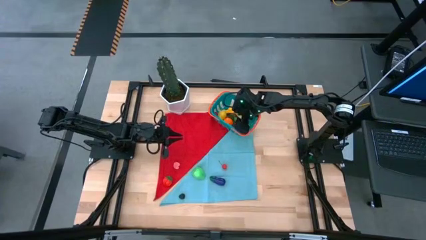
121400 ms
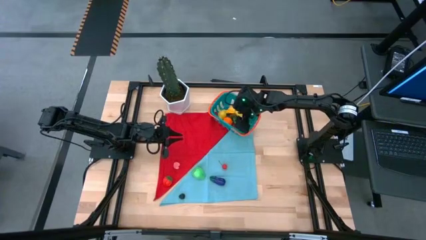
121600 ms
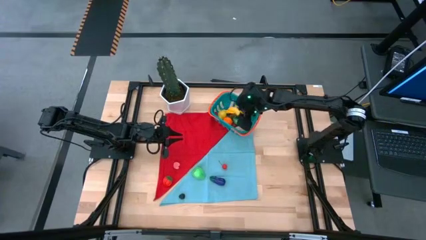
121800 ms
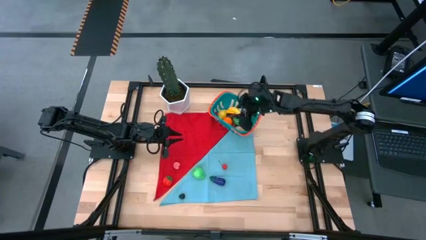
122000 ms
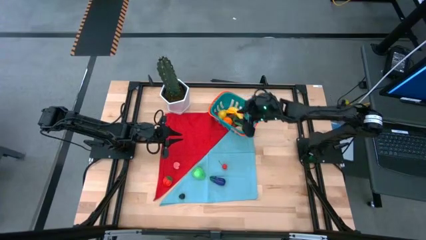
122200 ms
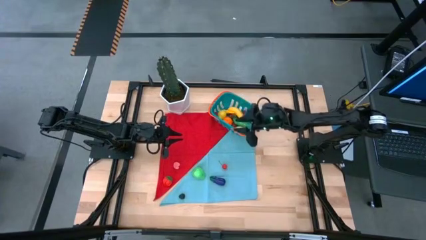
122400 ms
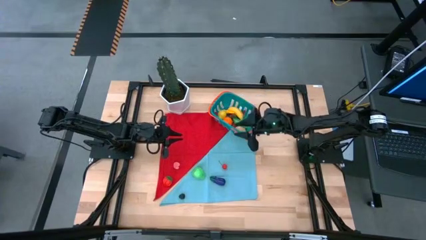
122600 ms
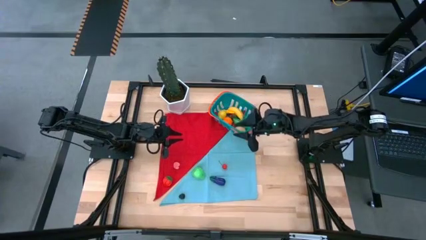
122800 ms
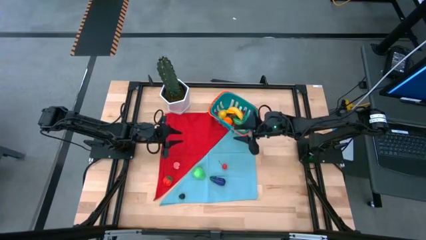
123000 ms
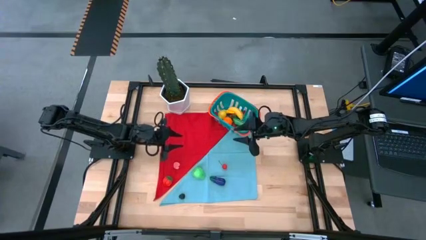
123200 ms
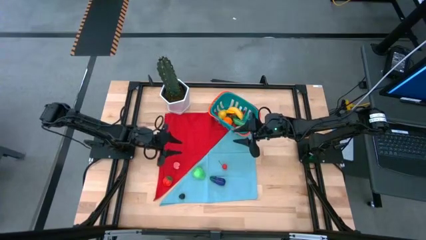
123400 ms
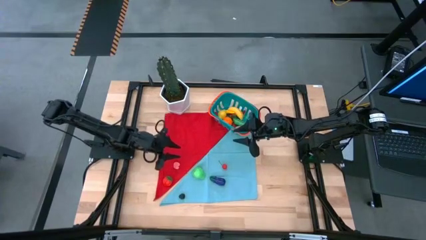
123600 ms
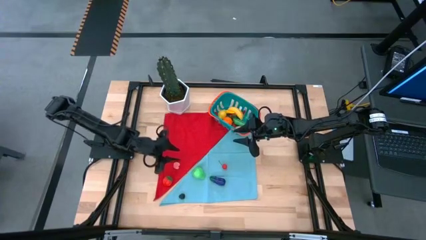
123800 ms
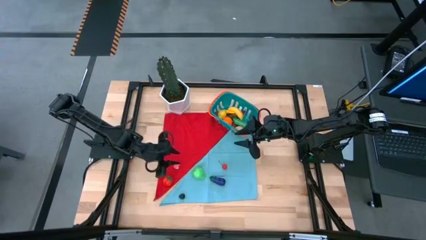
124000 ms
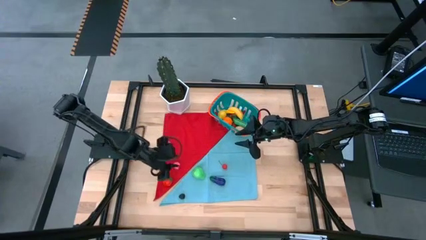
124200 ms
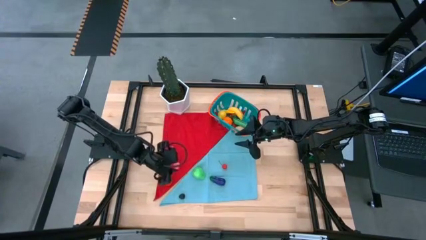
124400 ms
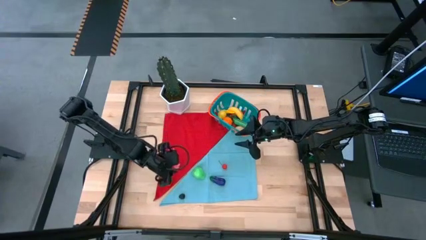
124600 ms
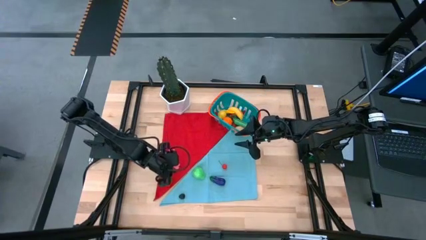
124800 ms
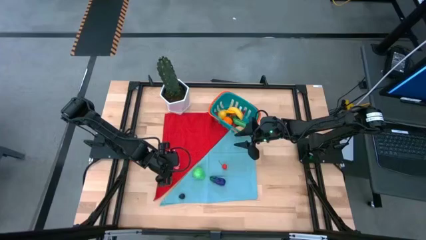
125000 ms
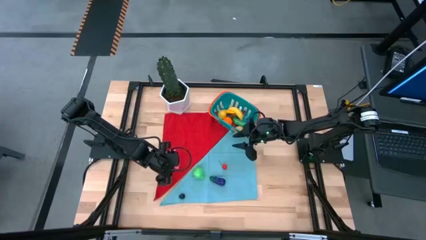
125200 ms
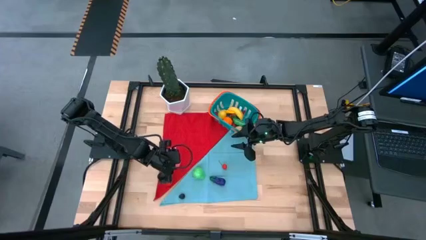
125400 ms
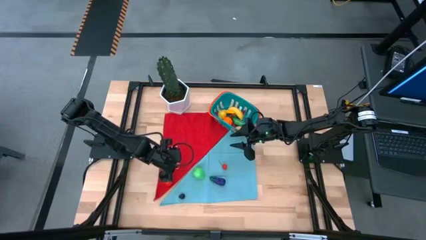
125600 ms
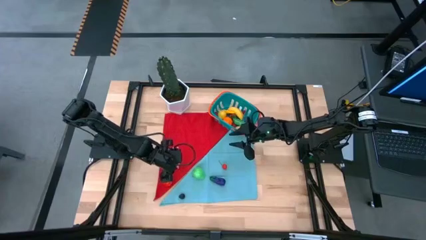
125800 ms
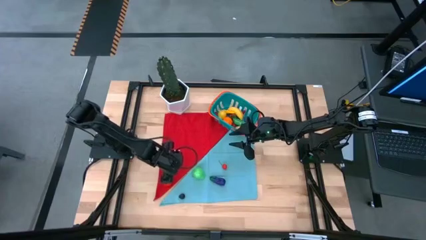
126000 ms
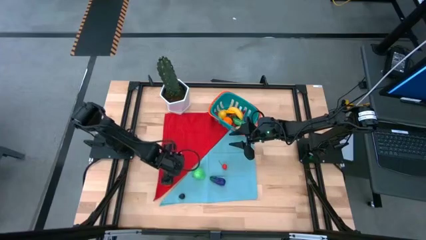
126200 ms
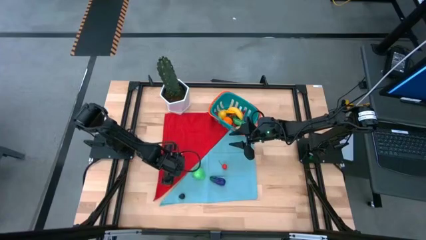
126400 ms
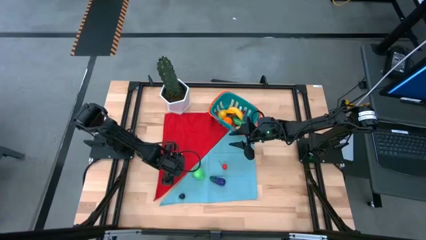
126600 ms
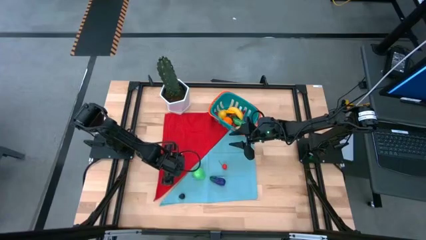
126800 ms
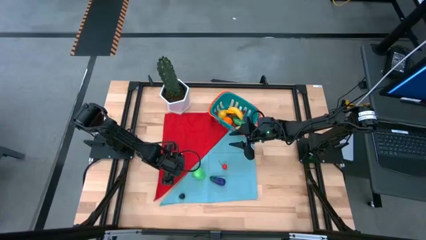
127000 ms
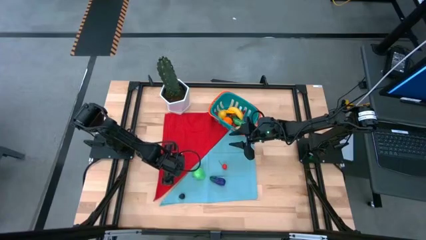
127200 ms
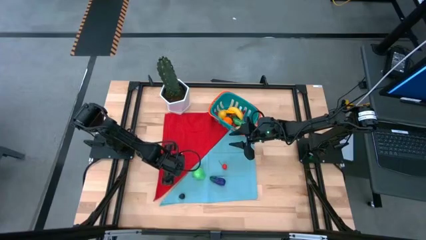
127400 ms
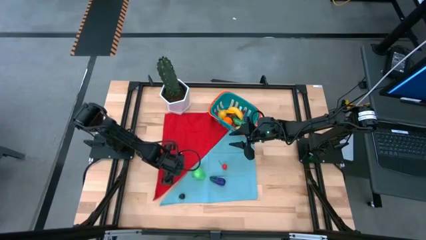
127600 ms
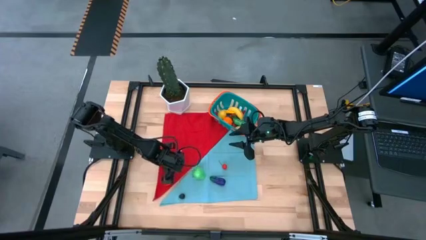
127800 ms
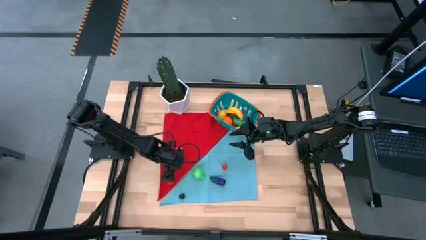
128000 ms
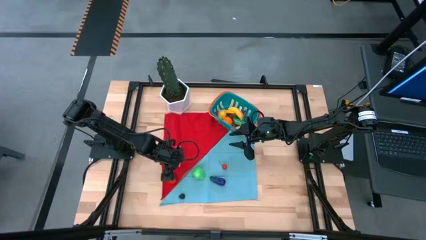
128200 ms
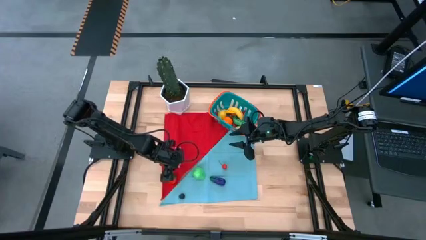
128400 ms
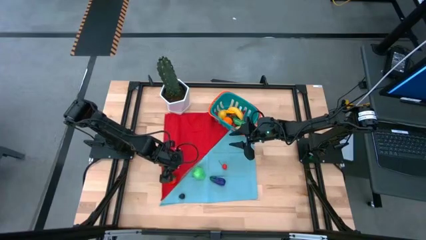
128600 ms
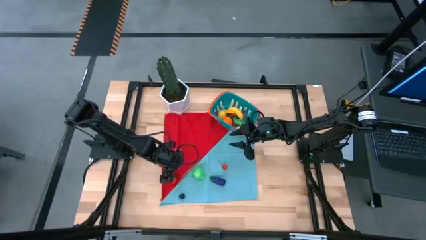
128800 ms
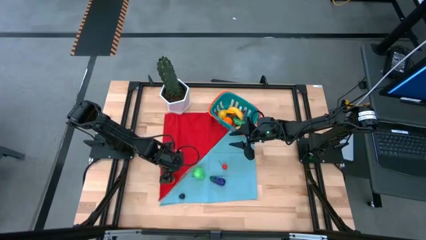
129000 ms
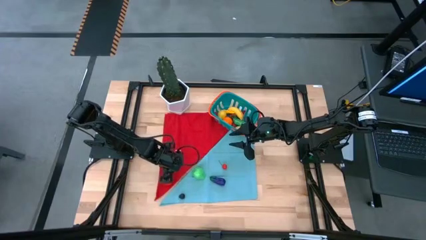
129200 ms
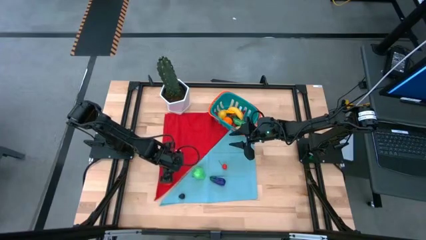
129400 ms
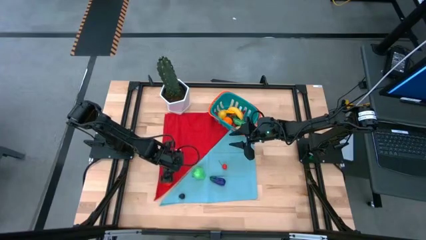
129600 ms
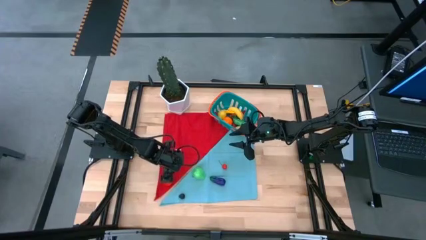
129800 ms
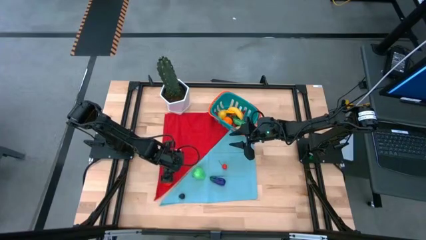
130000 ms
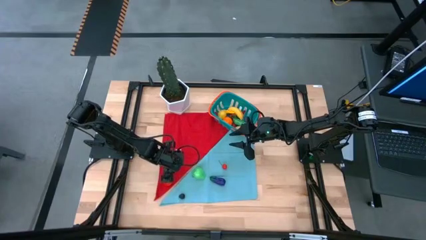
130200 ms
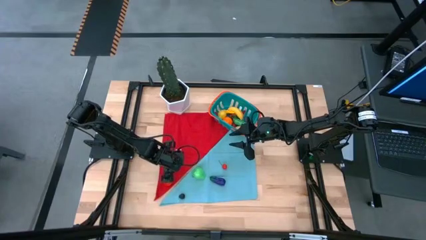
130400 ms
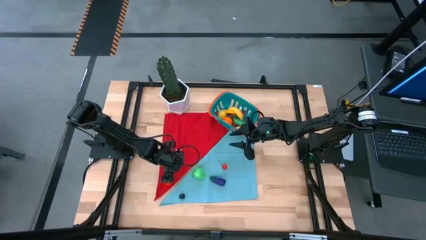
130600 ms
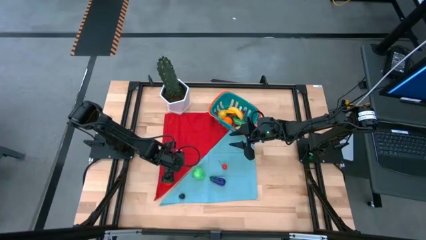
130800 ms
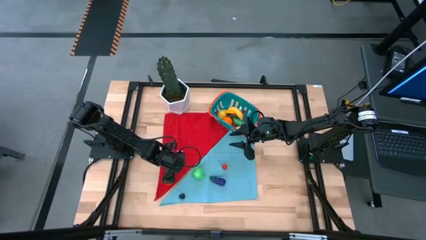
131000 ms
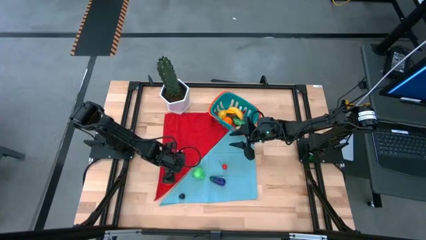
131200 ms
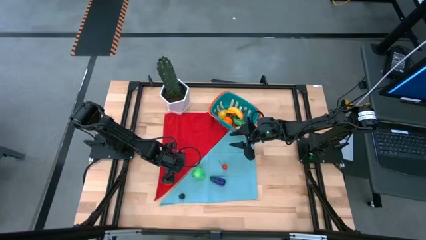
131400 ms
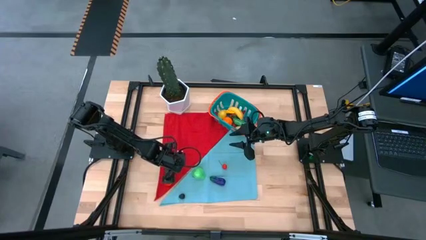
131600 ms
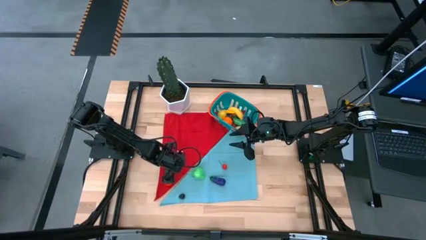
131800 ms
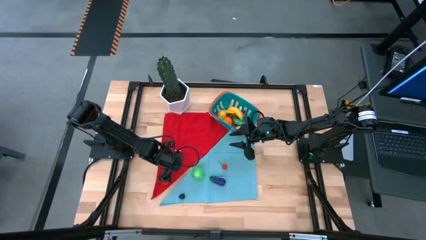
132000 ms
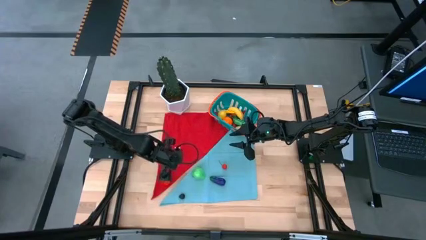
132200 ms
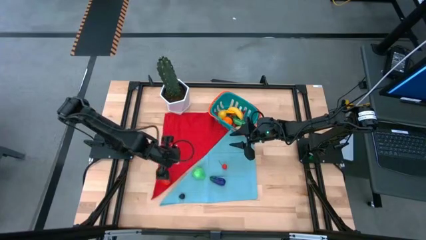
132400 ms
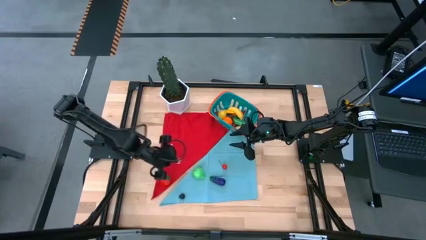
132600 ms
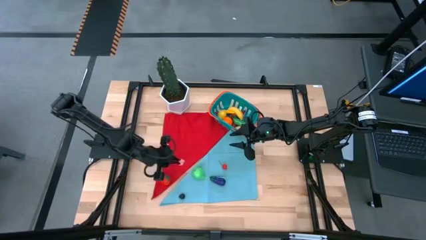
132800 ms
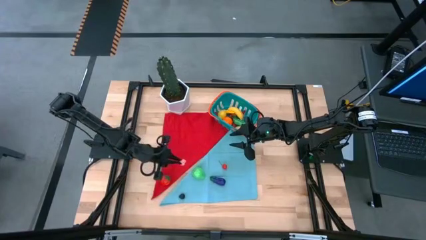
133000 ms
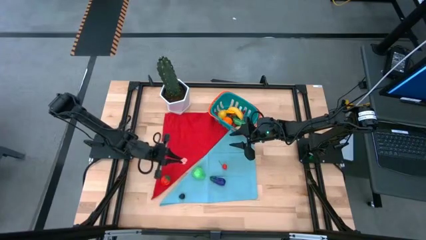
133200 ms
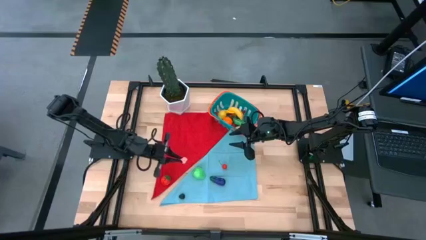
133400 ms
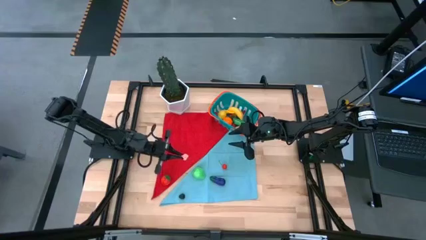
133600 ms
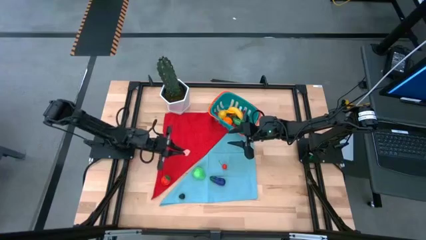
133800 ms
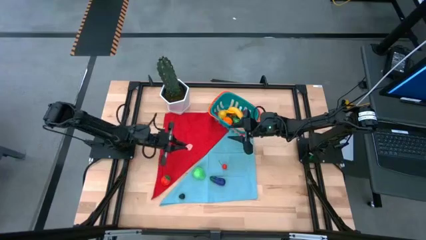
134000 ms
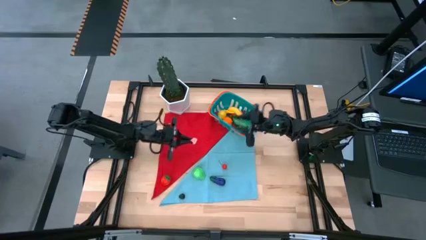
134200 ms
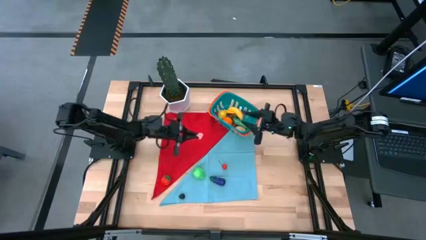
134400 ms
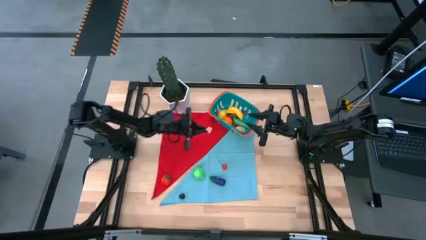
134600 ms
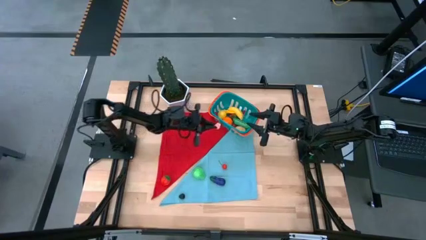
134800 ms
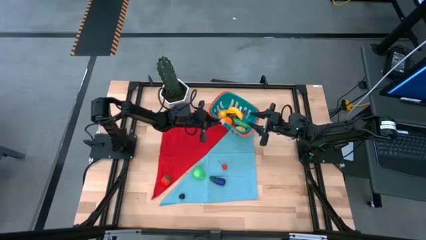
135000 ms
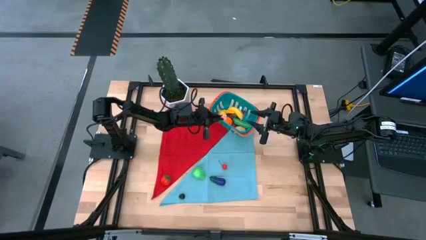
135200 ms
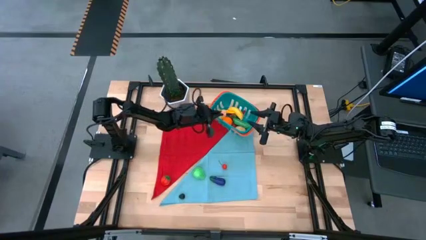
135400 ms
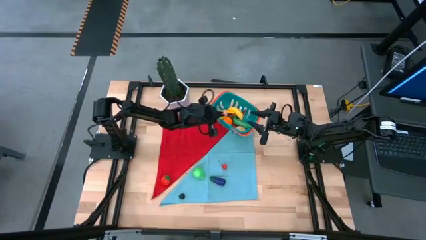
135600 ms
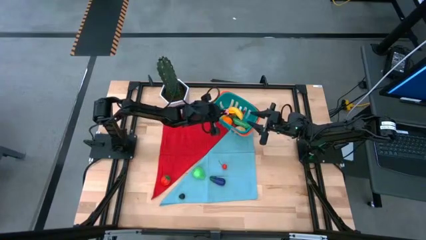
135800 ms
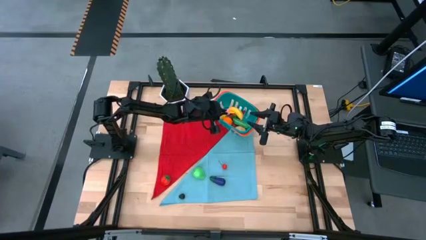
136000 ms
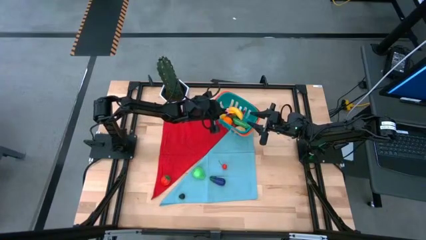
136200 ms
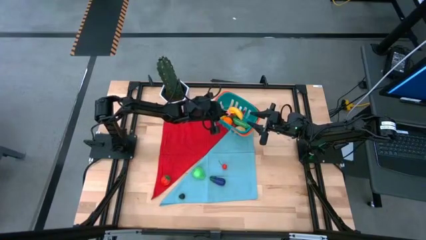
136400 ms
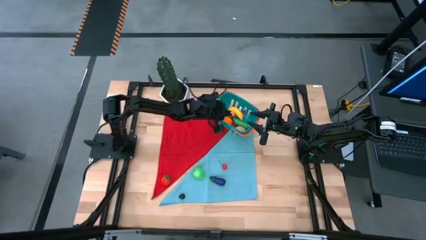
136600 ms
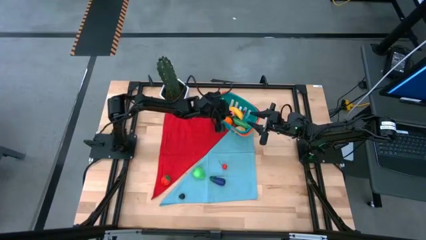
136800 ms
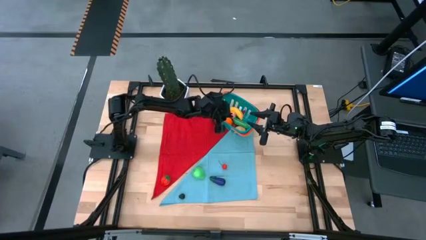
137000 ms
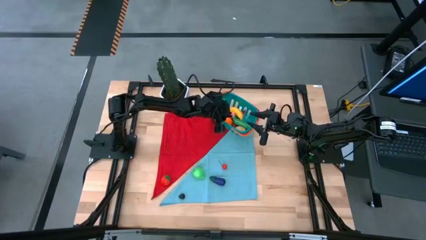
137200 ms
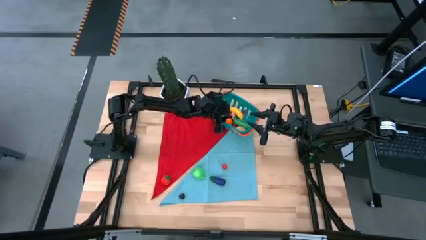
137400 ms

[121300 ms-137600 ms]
Task: Pick and placing Produce into tupperware
Put the pink peach into the blue basket
